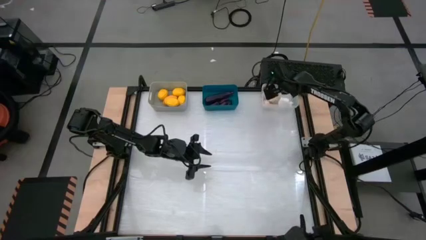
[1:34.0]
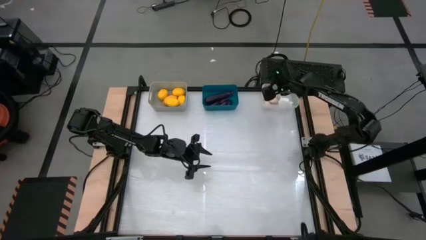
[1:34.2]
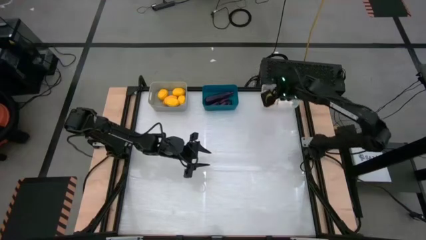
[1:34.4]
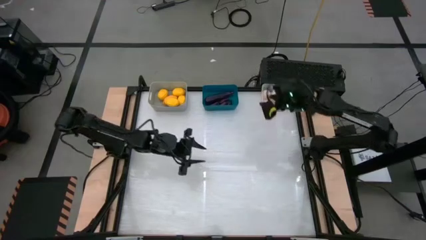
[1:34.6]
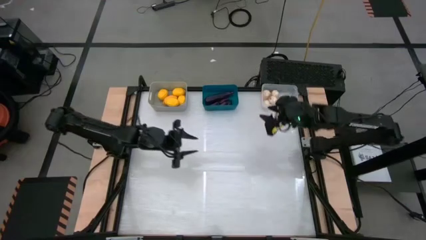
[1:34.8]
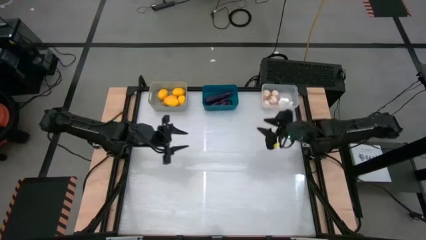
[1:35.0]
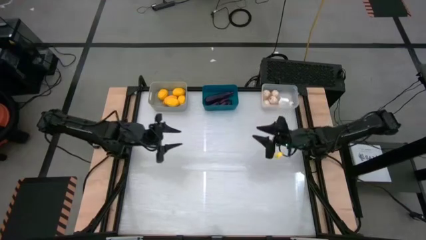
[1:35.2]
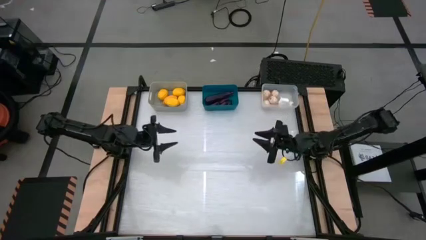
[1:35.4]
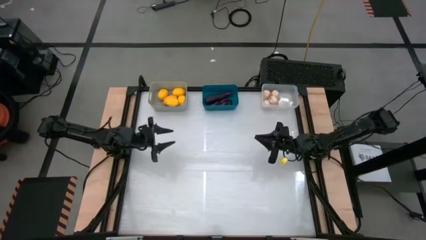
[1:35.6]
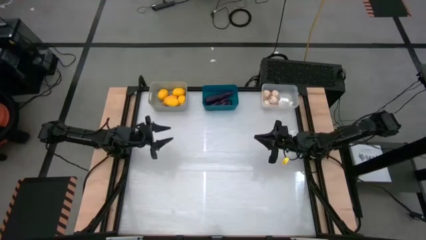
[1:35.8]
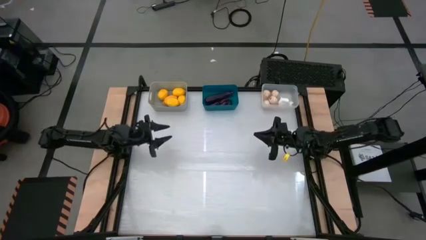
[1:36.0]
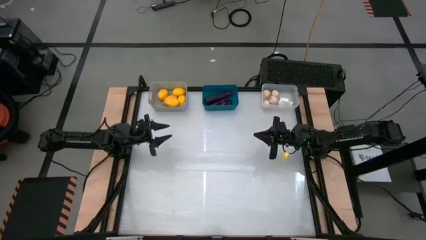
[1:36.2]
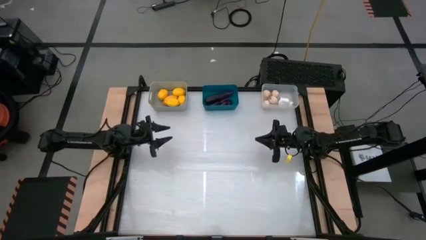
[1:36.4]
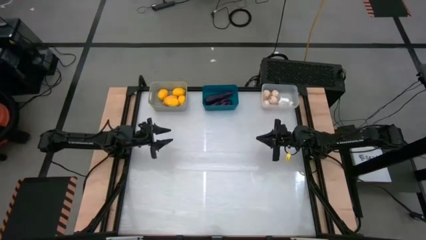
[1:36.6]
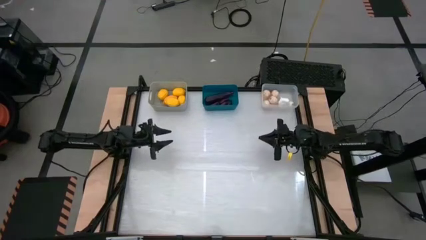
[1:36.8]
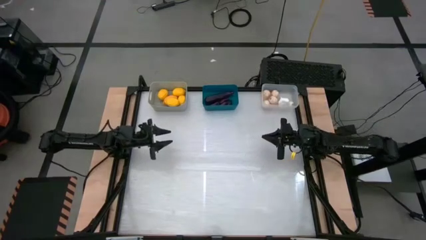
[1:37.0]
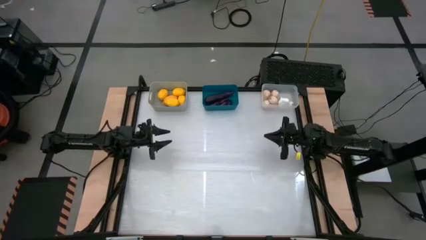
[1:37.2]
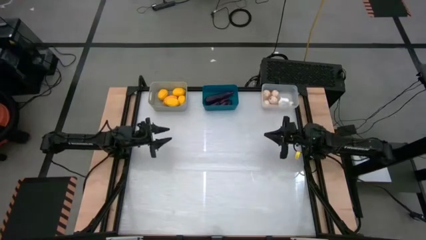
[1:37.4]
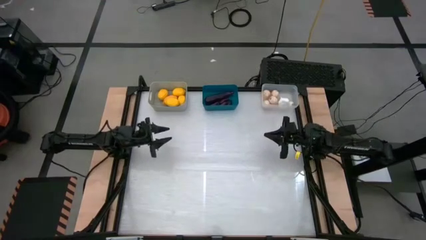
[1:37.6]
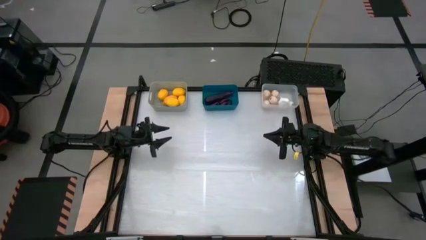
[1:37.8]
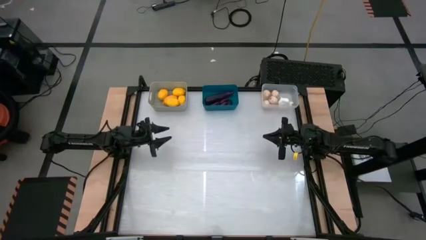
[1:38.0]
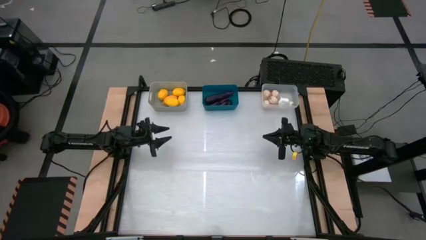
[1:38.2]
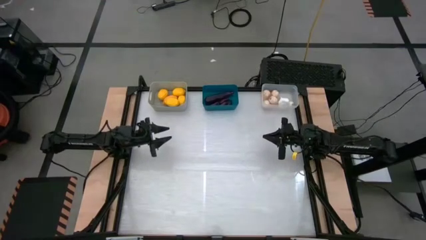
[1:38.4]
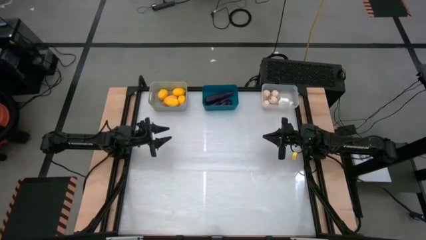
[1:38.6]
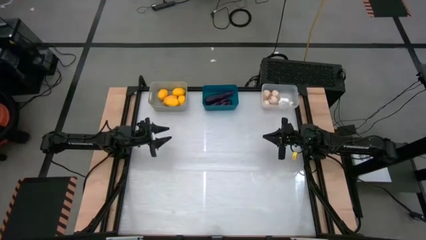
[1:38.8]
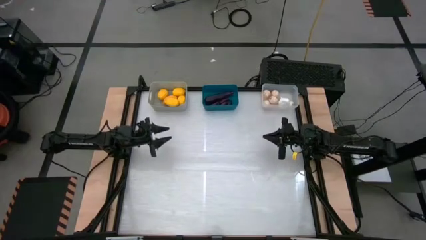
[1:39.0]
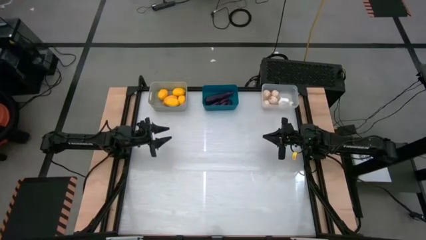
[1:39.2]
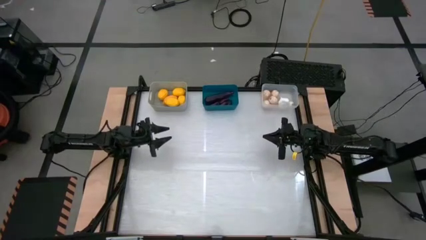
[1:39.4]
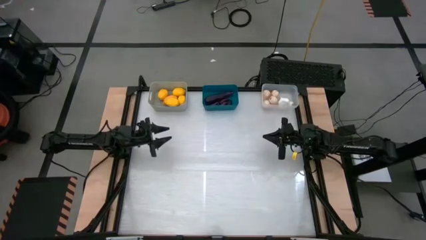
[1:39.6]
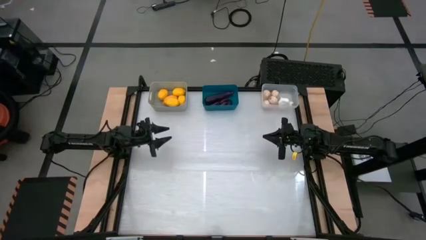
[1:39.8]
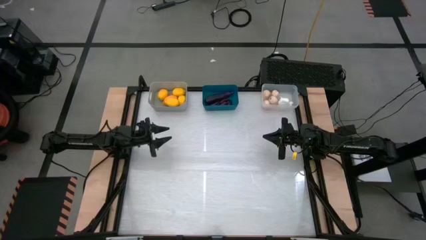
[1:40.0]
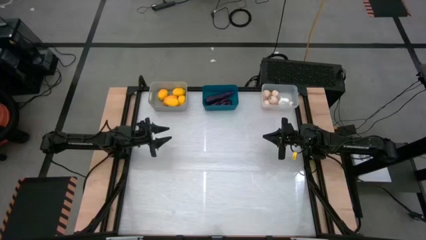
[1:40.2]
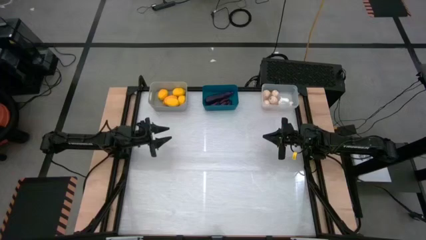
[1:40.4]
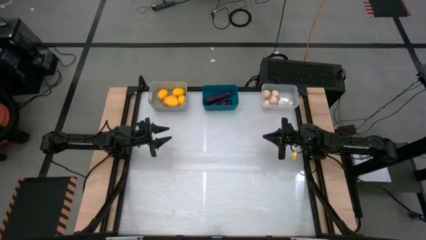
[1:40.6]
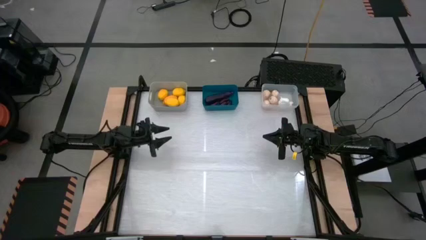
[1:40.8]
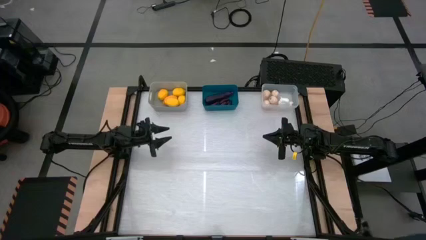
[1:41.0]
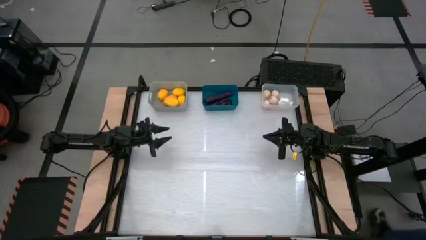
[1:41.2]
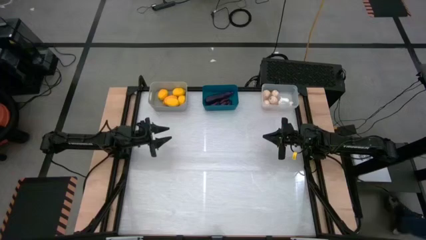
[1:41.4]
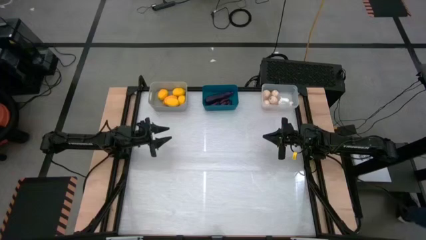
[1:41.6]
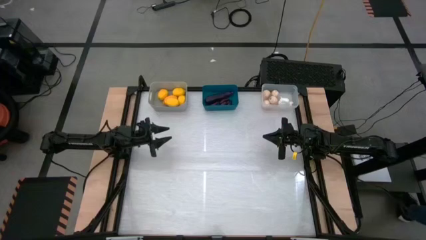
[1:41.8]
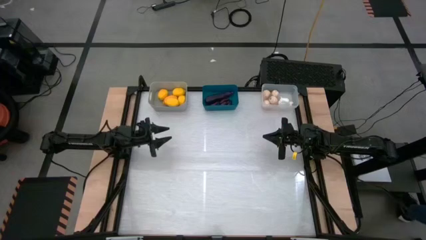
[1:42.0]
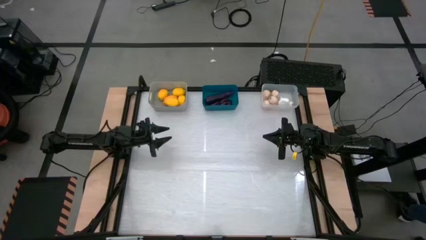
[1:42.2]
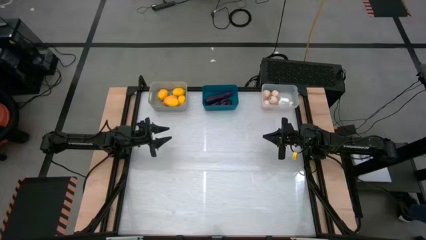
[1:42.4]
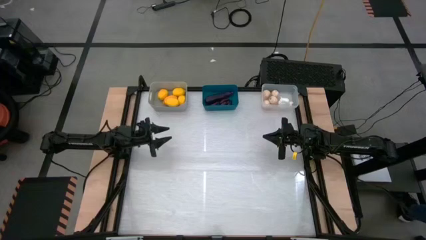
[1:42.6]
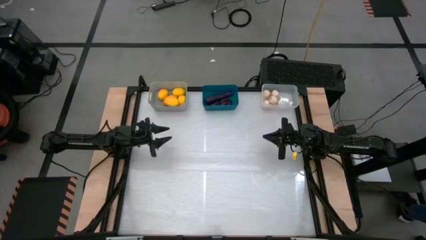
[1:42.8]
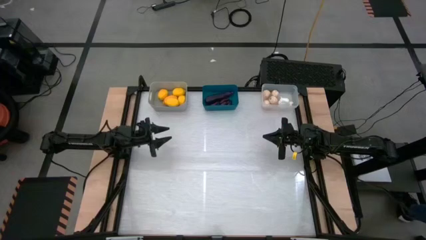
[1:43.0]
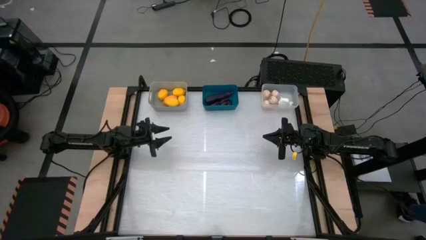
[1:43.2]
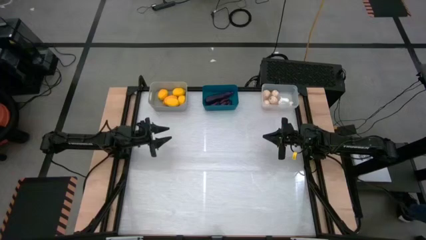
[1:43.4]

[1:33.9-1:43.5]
Task: Sort produce into baskets
Return to Home Position

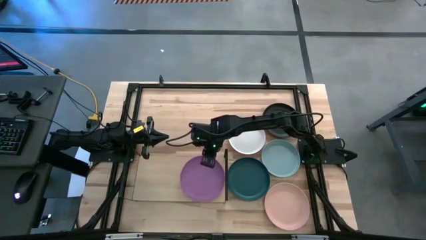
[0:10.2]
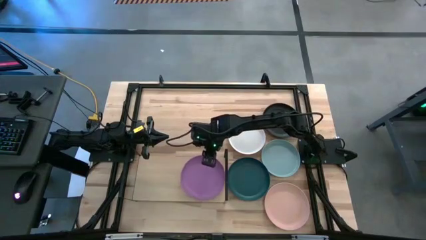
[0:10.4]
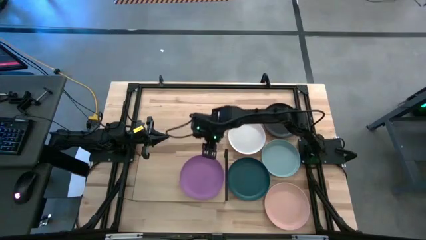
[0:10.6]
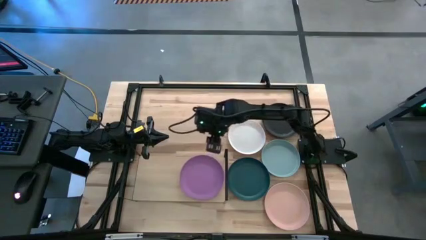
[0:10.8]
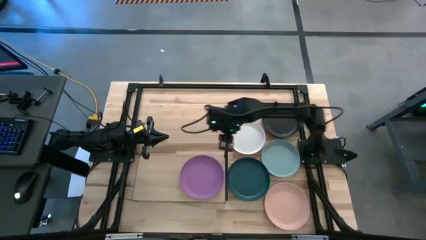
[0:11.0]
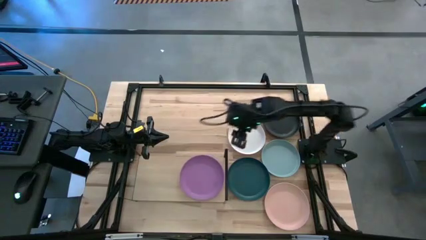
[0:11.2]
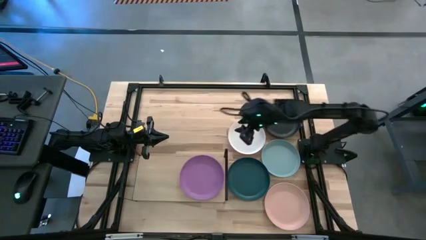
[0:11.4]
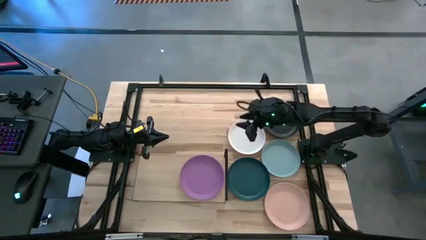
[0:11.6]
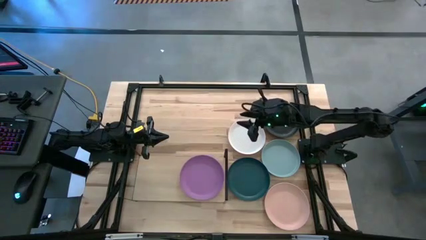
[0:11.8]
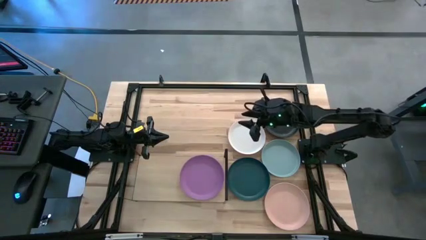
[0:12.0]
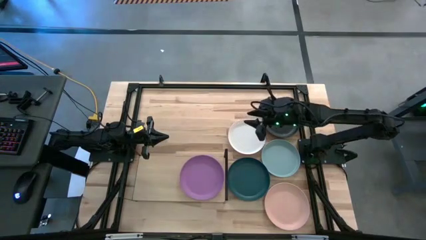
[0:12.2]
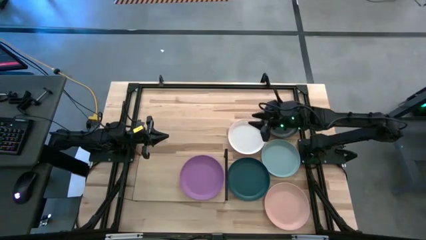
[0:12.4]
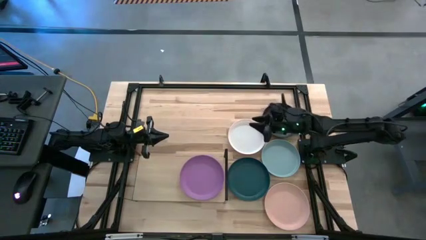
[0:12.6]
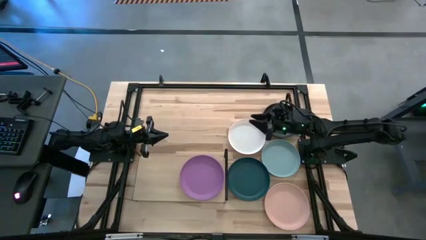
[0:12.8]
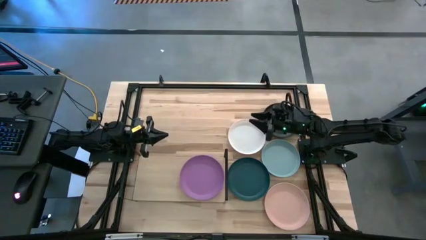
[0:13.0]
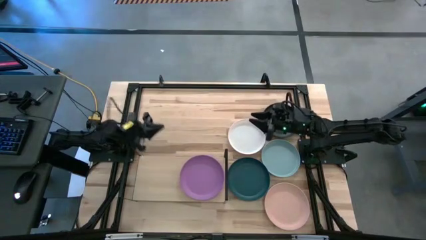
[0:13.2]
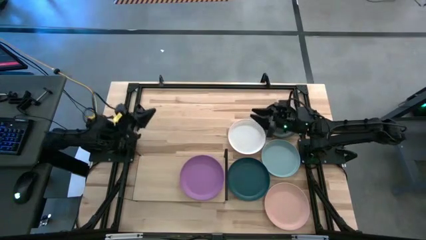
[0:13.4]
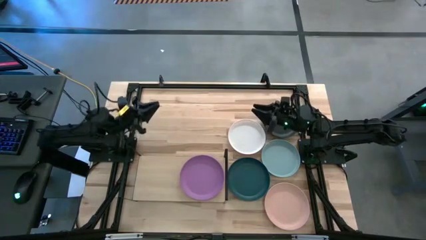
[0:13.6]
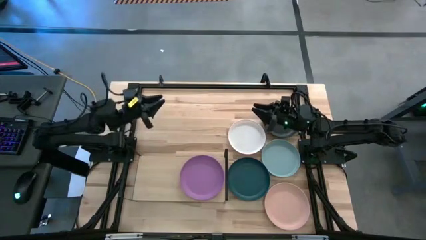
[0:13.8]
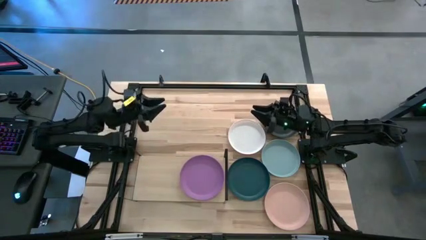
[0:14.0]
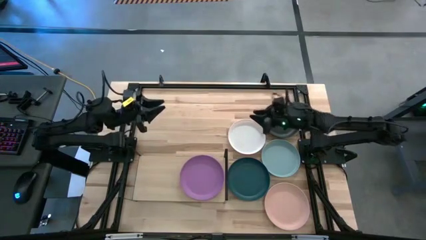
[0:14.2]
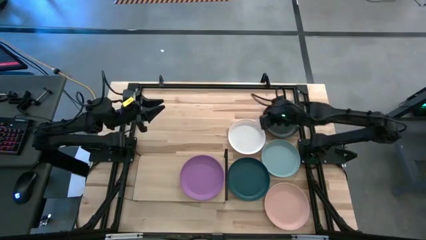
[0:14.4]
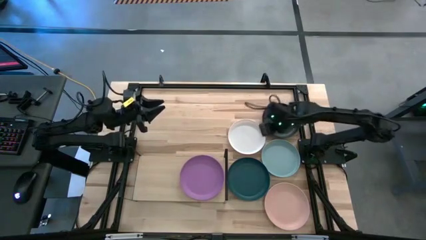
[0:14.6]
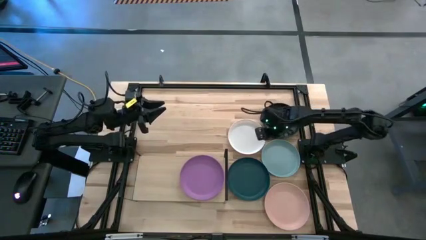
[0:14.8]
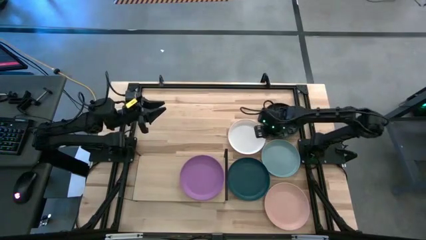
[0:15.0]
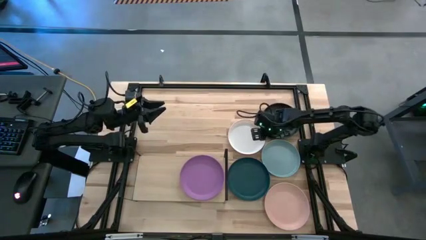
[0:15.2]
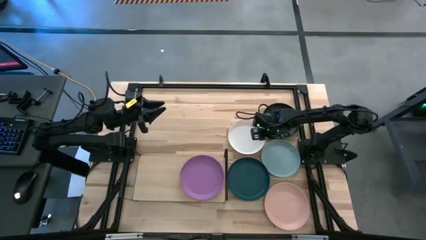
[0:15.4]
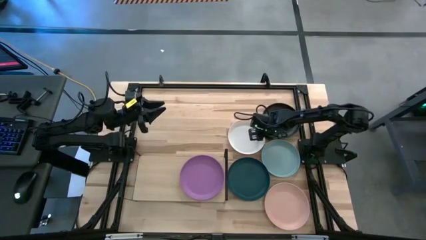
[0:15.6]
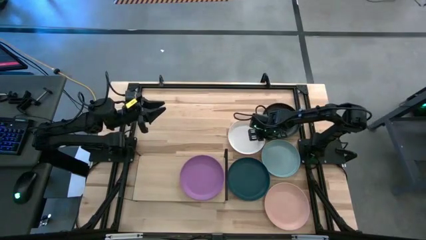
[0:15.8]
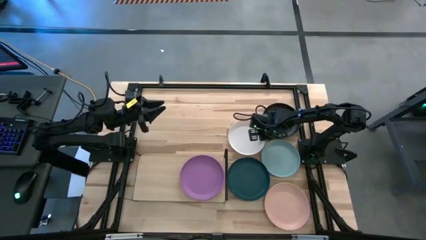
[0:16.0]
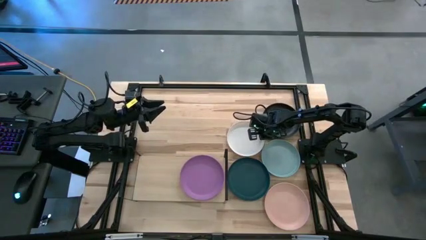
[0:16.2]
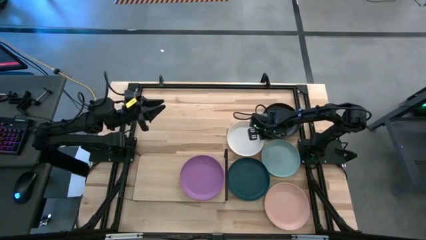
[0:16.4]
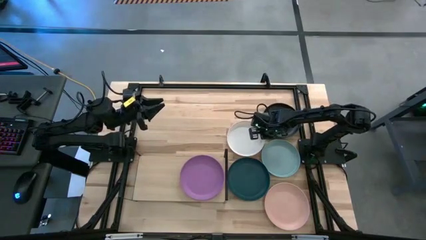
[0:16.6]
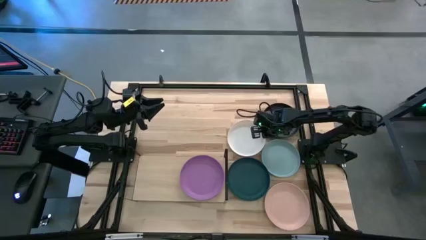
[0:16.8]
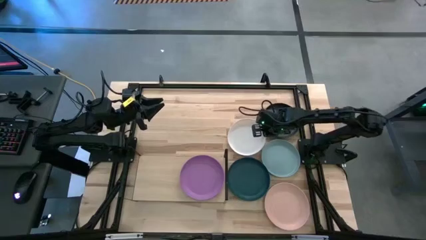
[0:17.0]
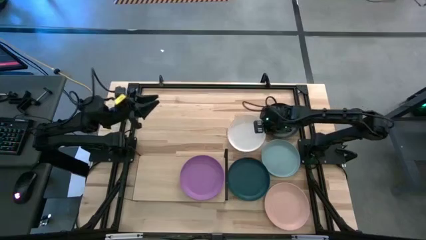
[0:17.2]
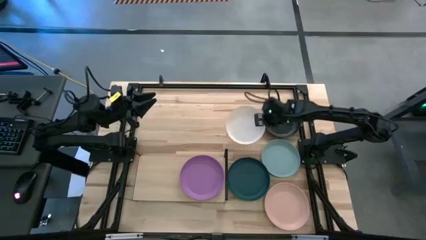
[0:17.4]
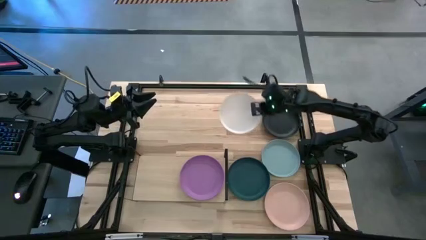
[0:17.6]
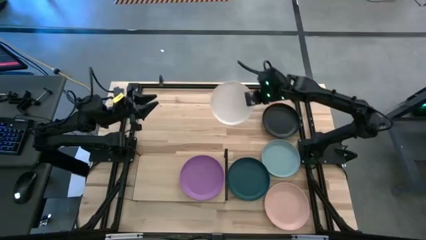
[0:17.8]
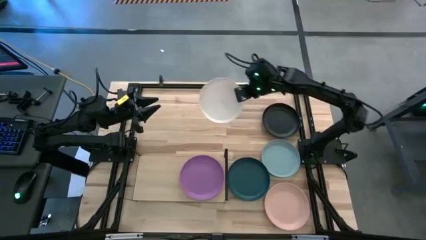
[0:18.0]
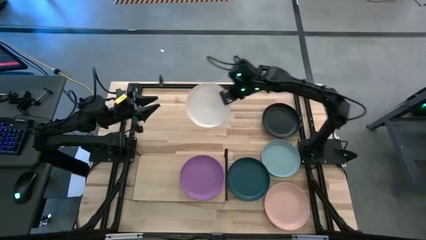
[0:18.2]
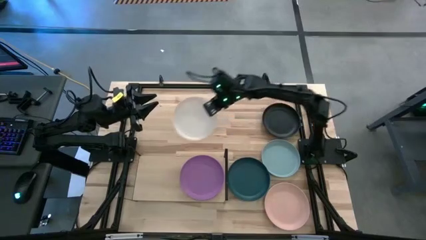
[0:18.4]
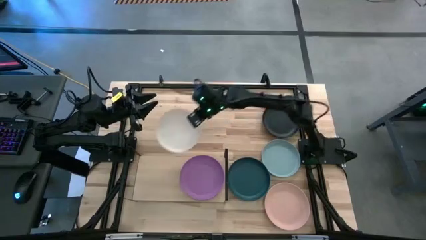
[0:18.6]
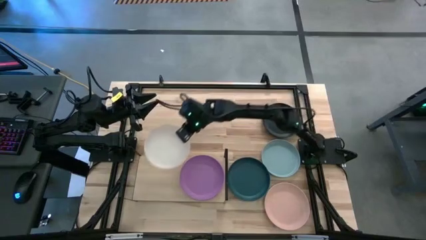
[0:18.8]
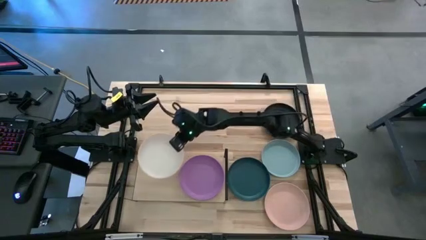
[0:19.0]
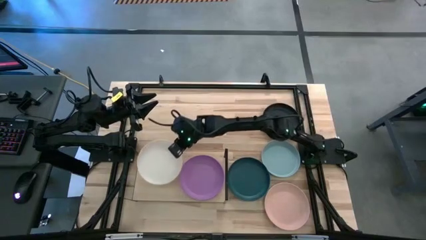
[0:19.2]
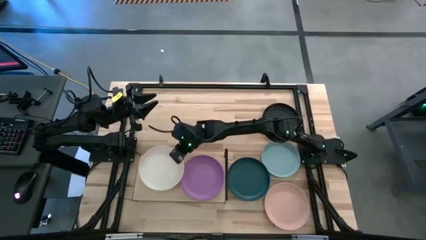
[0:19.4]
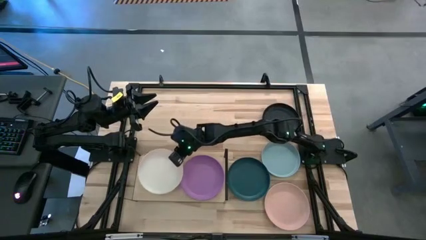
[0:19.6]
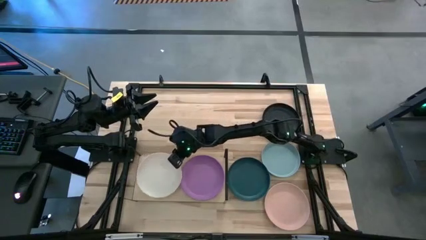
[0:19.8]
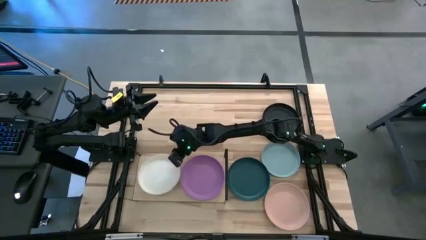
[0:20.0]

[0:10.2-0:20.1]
Task: Place and stack plates onto a shelf
Put the white plate on the shelf
